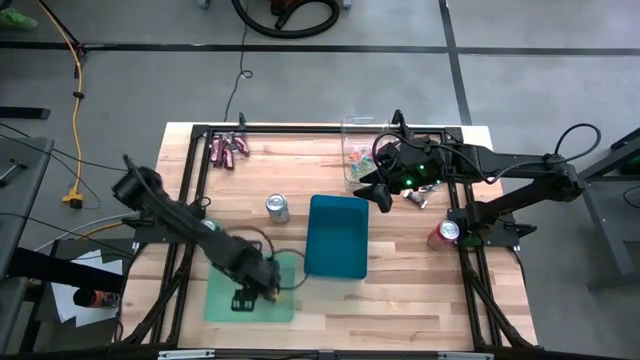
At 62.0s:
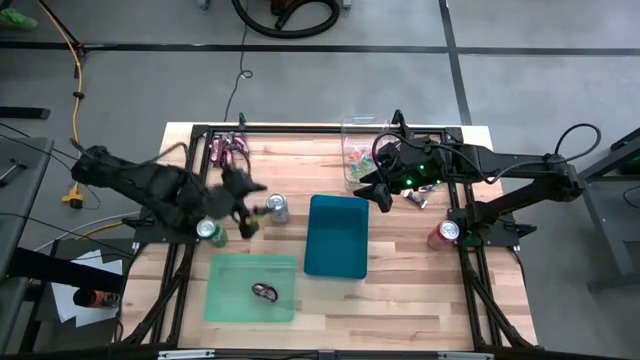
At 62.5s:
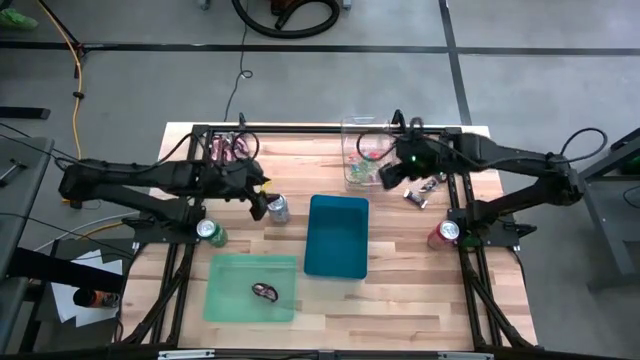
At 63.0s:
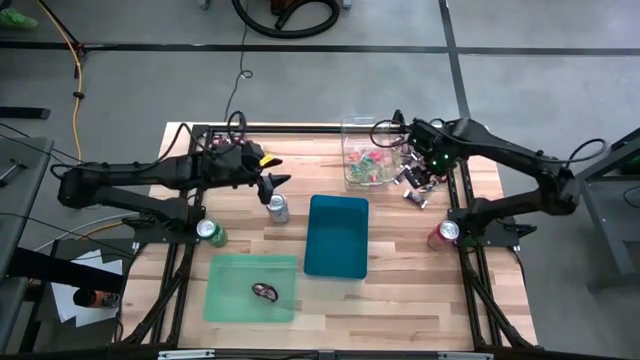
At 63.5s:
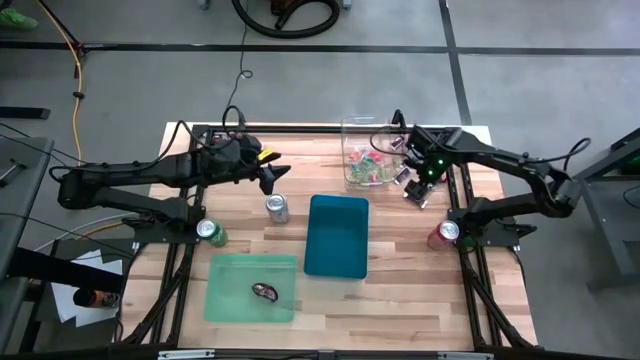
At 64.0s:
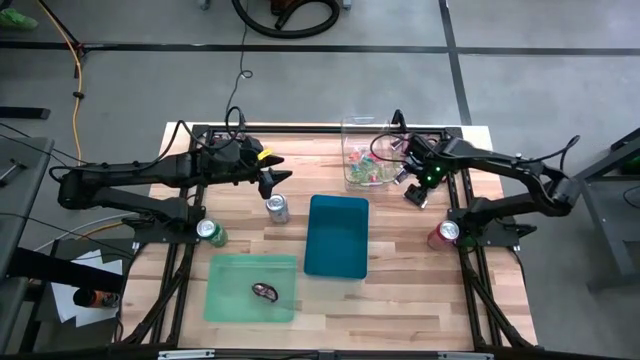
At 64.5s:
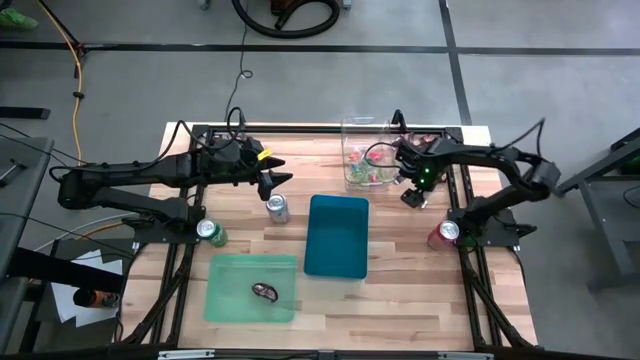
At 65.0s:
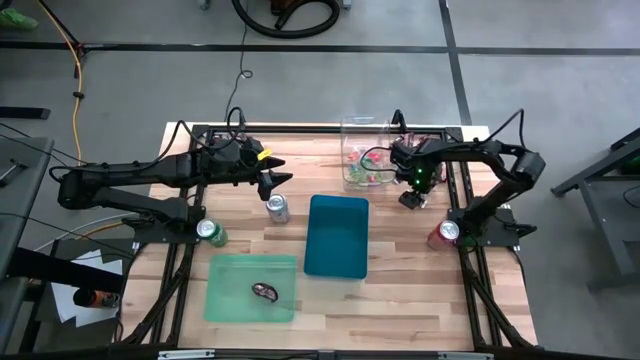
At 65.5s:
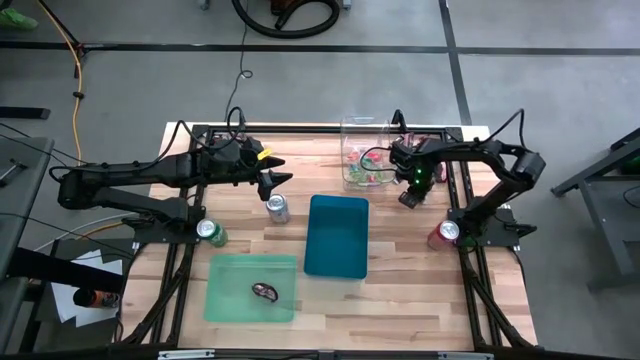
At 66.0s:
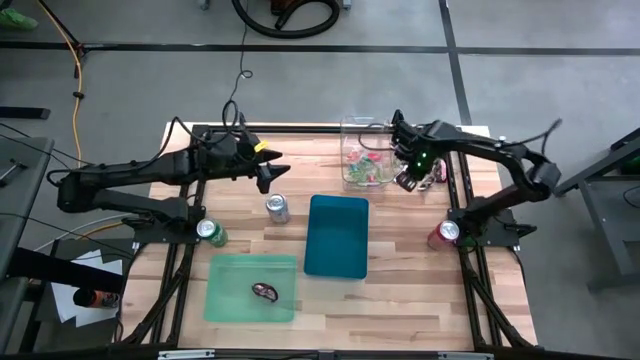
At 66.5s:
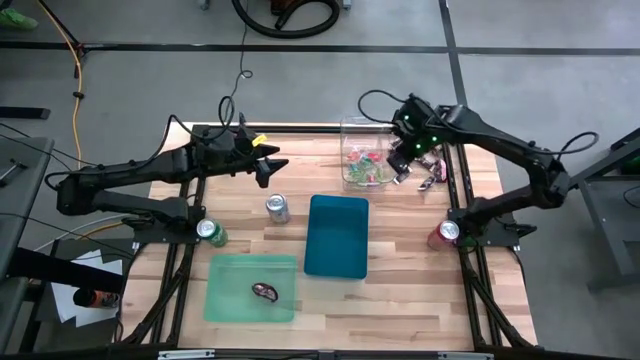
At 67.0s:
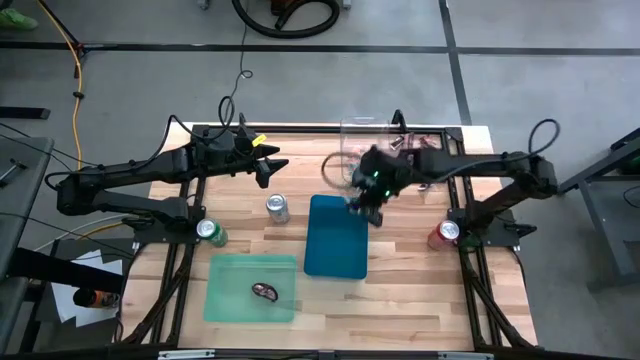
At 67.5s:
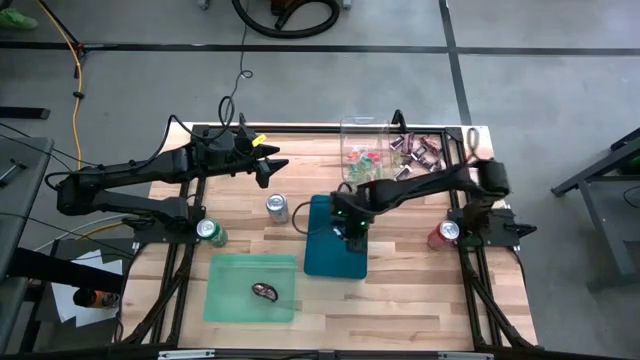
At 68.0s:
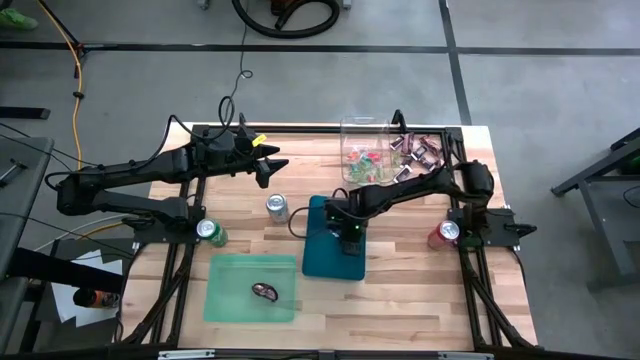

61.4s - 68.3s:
Task: Sort candy
Put the brown-white chocolate into the blue bin

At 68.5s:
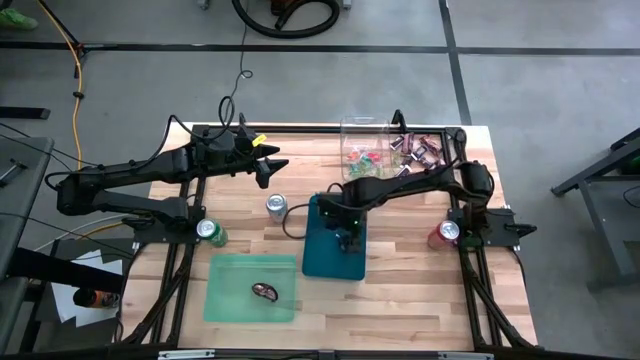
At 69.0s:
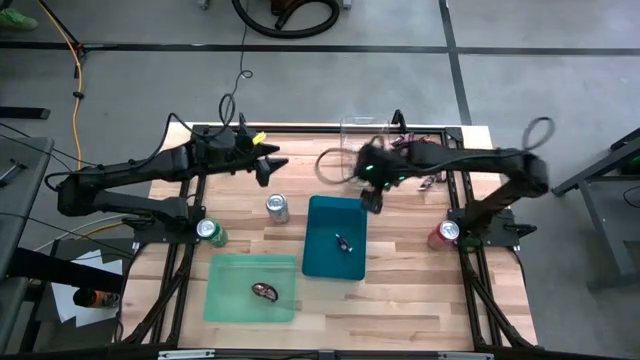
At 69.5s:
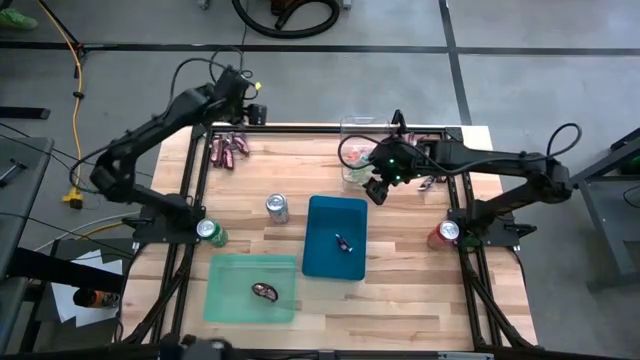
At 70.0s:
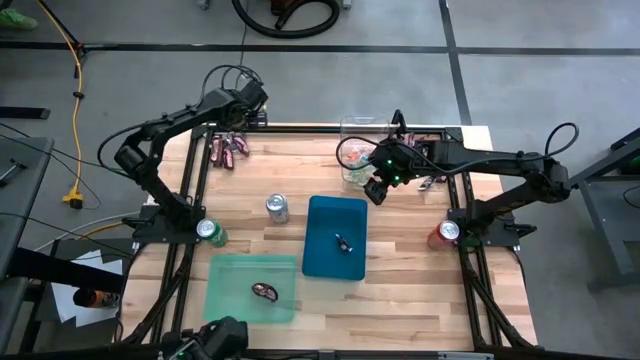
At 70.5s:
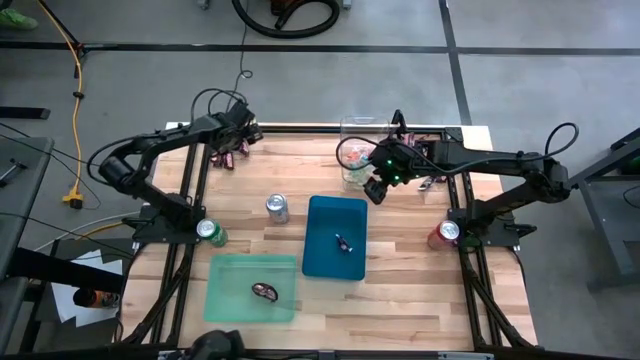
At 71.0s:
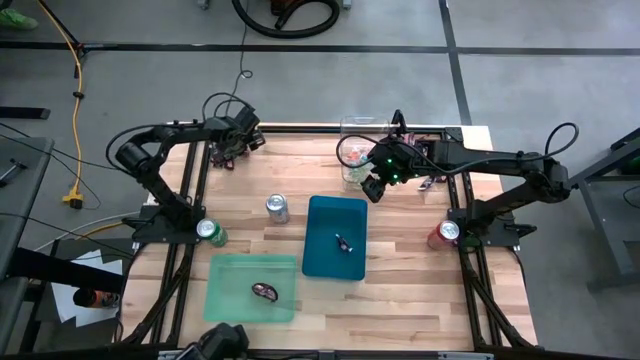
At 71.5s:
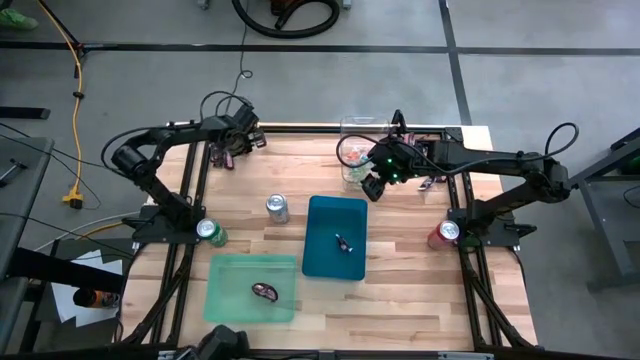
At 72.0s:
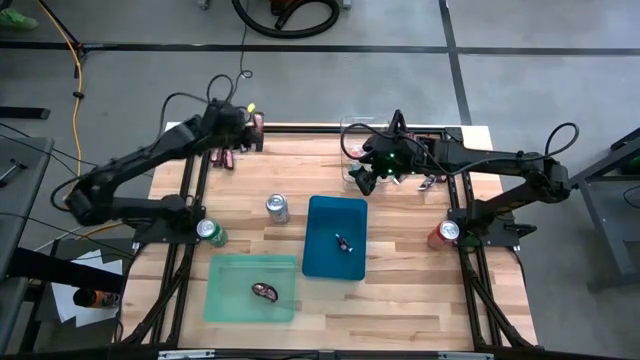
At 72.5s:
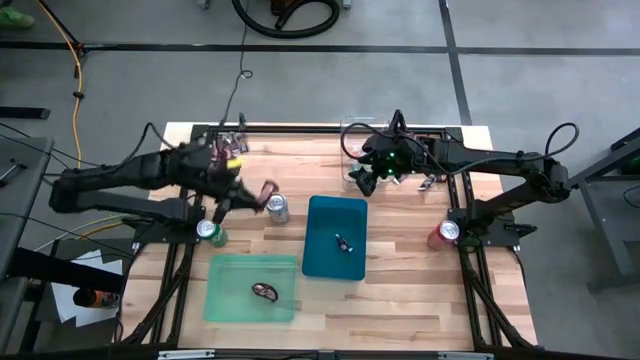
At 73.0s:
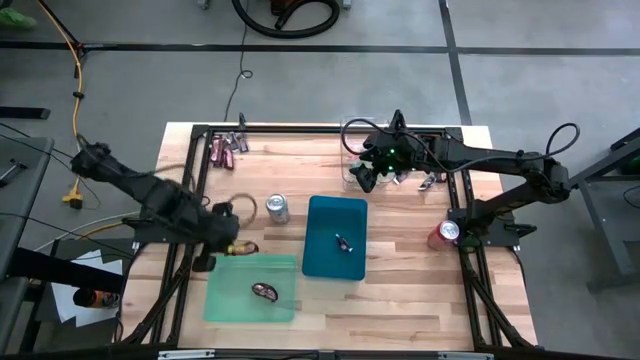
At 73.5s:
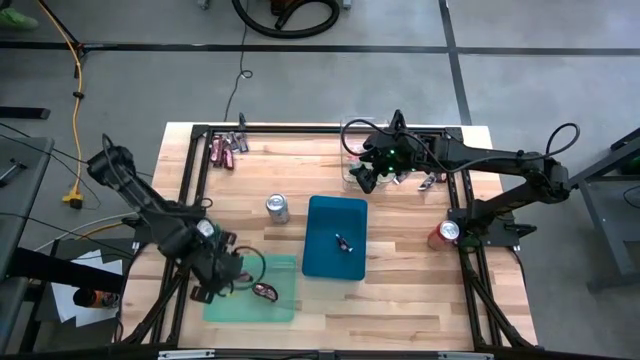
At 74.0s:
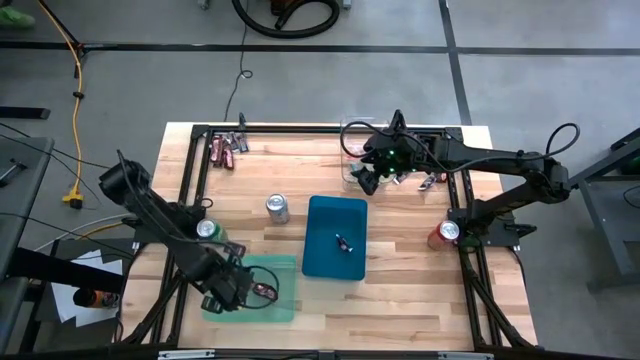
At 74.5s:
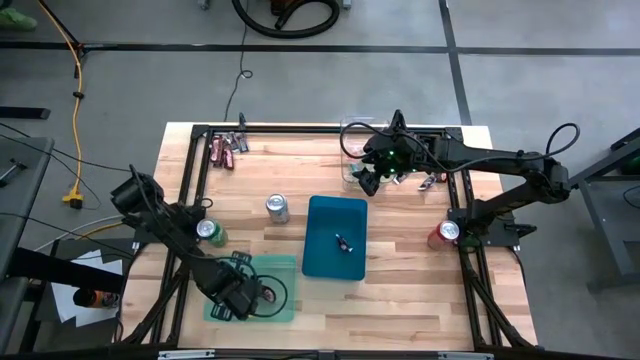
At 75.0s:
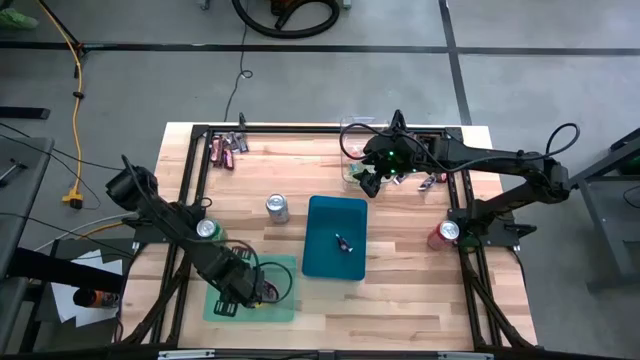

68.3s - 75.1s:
Put the brown chocolate into the green bin

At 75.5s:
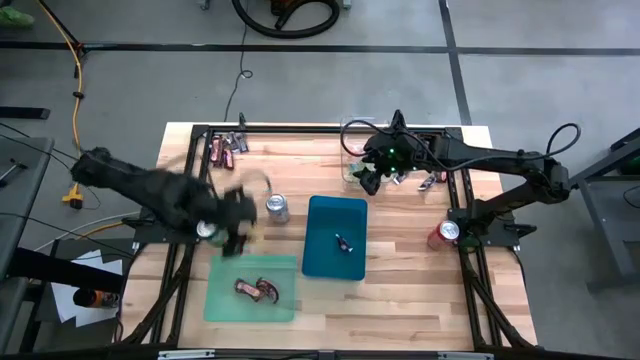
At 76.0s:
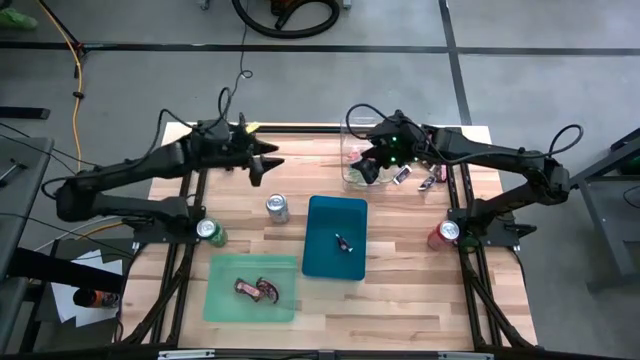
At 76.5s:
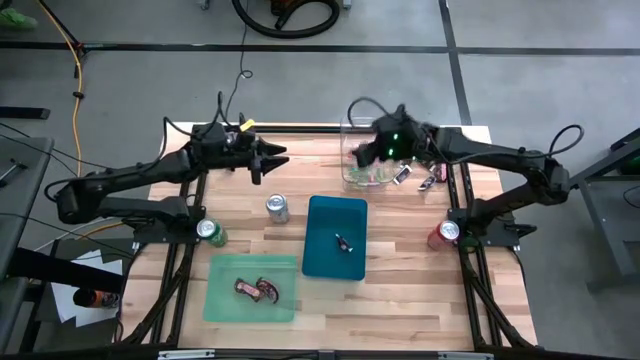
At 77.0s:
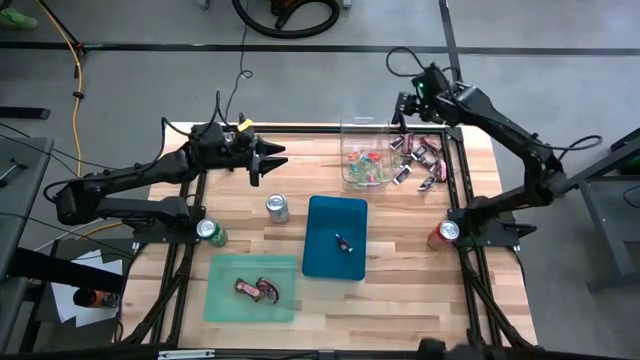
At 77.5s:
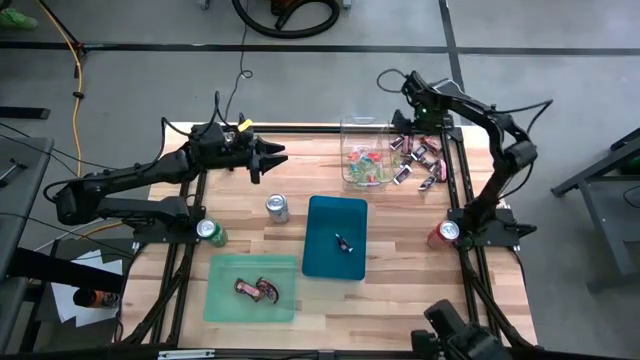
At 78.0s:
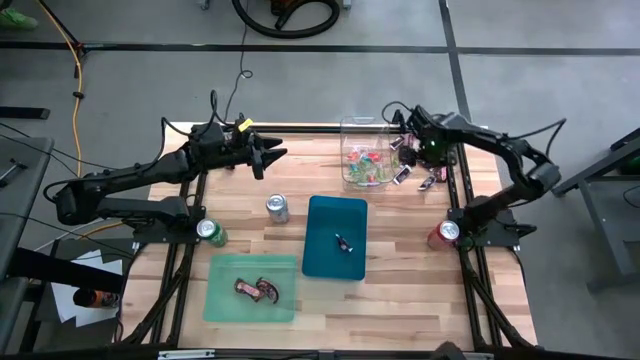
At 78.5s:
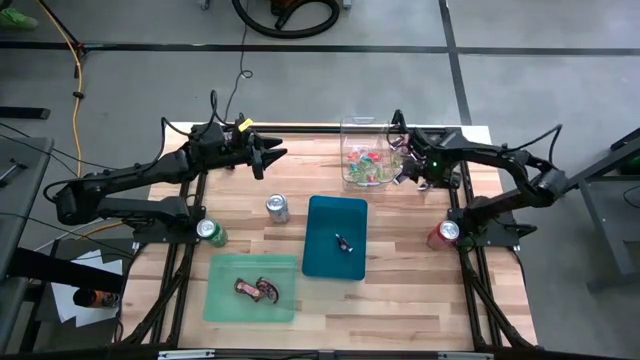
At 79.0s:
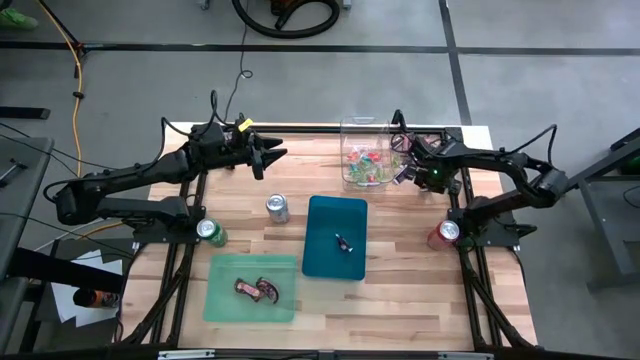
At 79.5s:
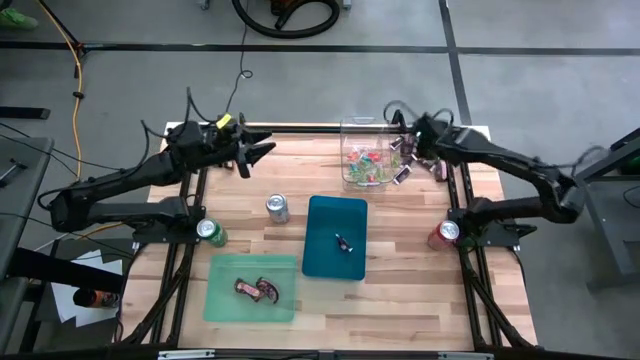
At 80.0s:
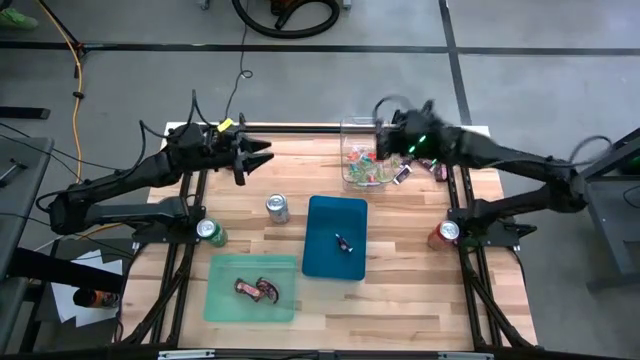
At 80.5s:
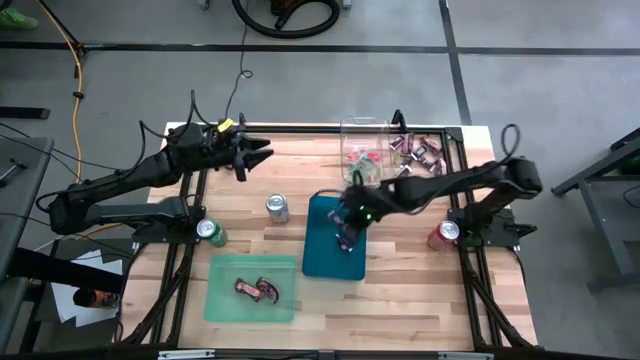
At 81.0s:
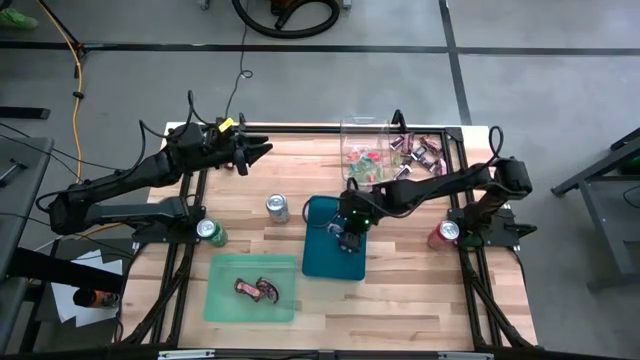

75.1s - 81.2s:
Put the brown-white chocolate into the blue bin

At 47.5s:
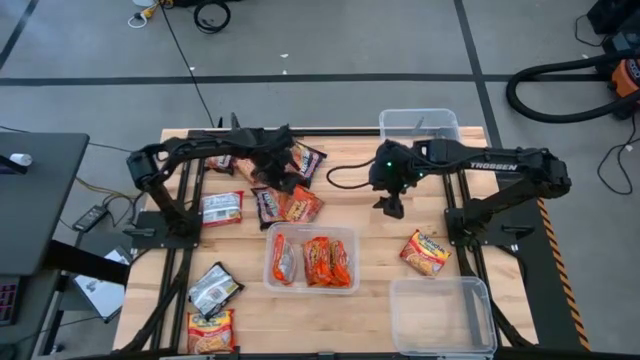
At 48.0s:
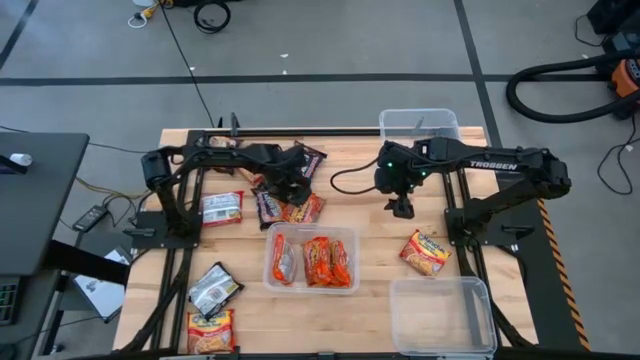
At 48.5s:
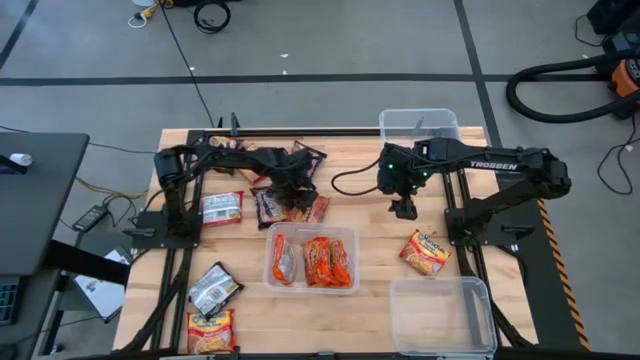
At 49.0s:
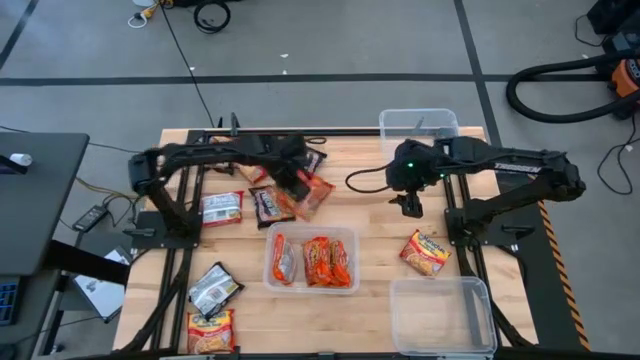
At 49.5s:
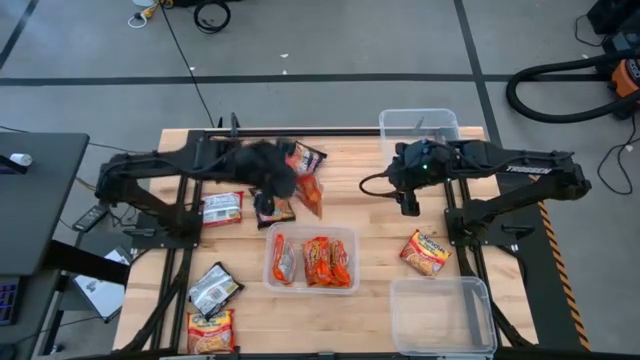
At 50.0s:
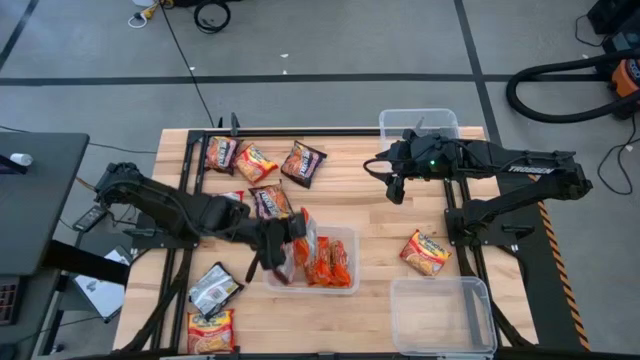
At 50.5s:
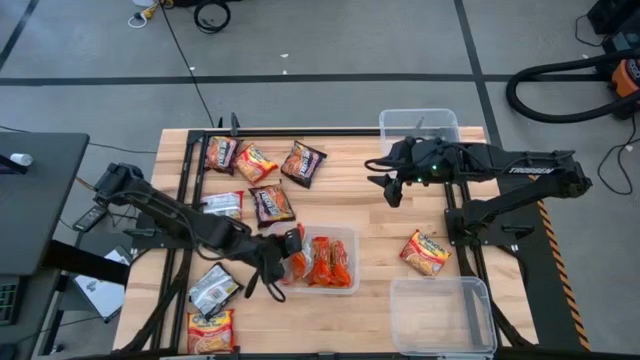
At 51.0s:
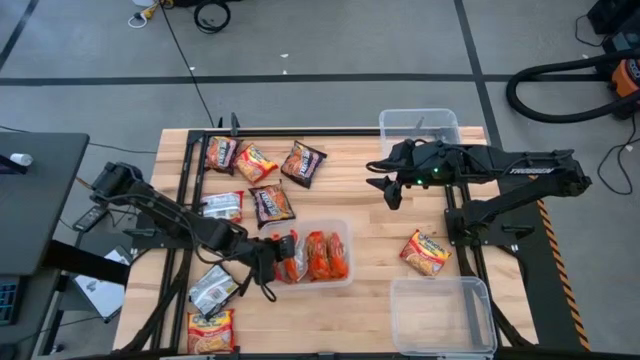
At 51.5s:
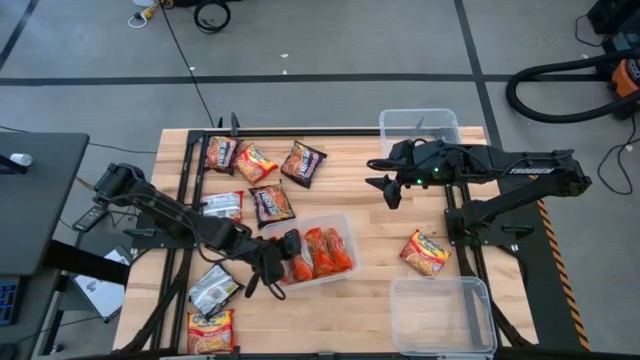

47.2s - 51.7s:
Task: Sort Maruchan noodles
Put the orange noodle pack into the bottom left transparent bin
